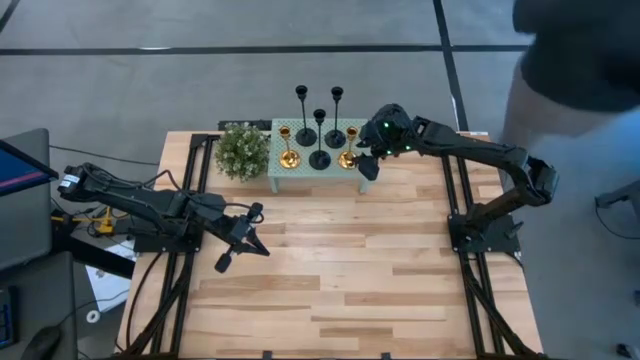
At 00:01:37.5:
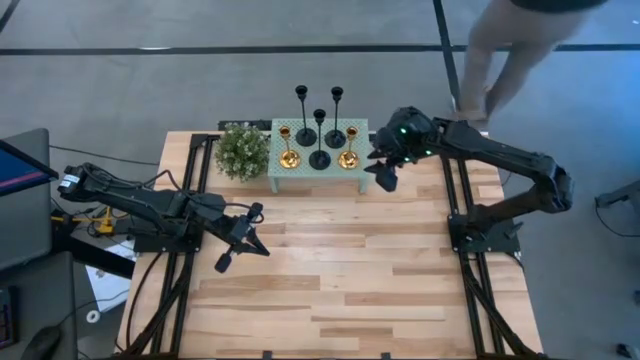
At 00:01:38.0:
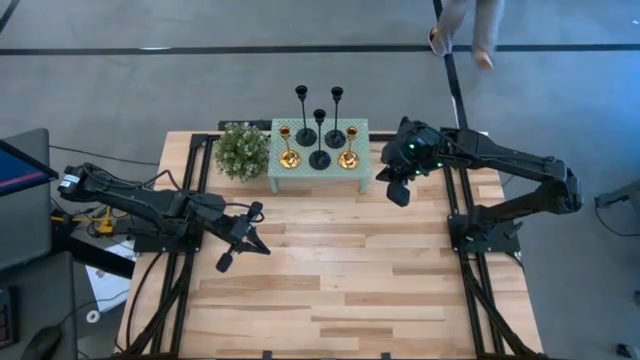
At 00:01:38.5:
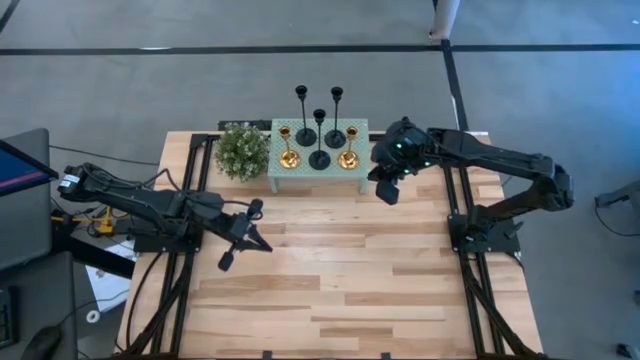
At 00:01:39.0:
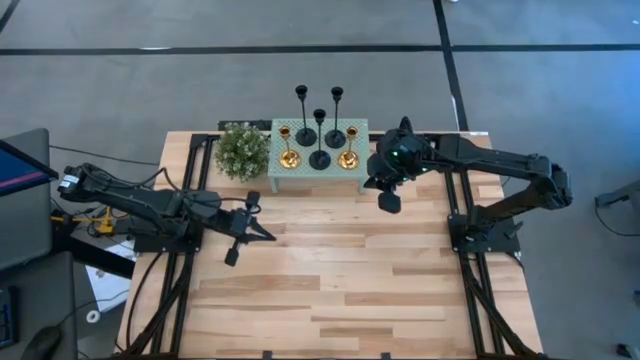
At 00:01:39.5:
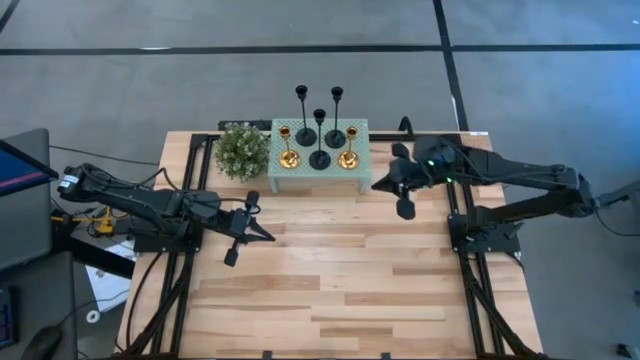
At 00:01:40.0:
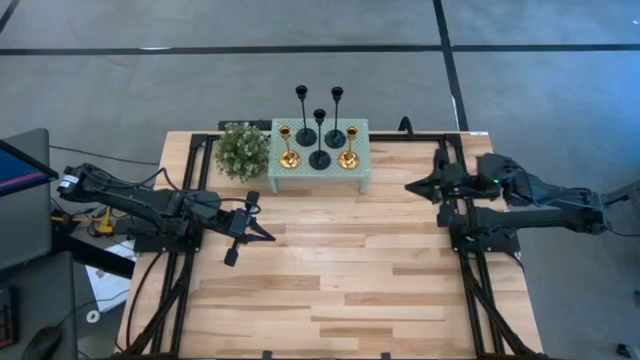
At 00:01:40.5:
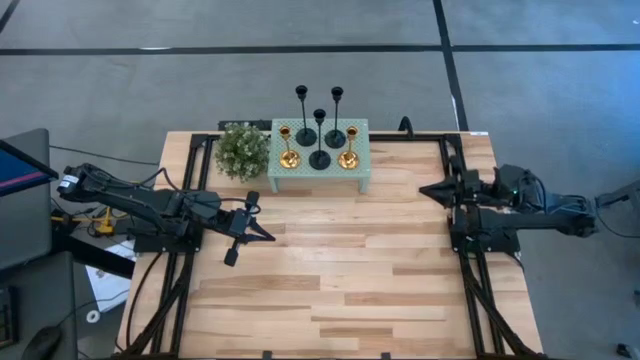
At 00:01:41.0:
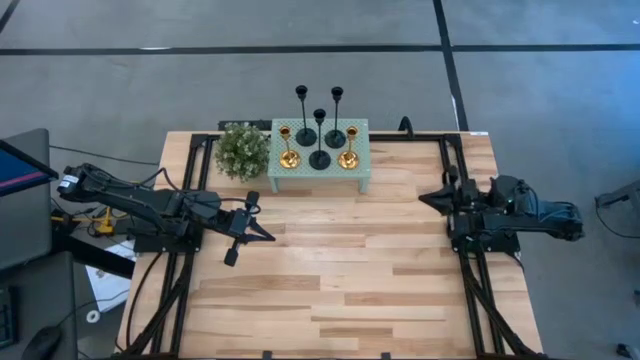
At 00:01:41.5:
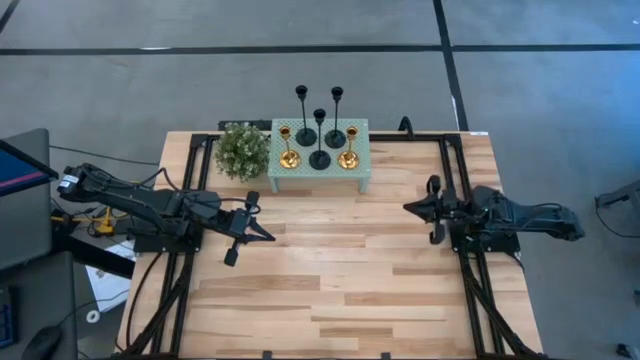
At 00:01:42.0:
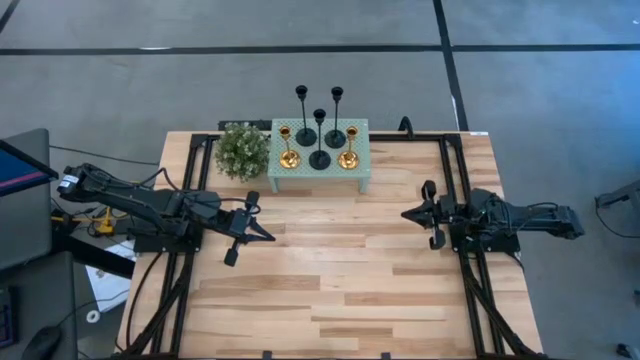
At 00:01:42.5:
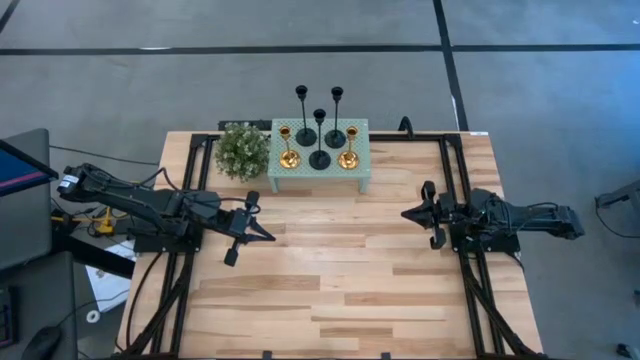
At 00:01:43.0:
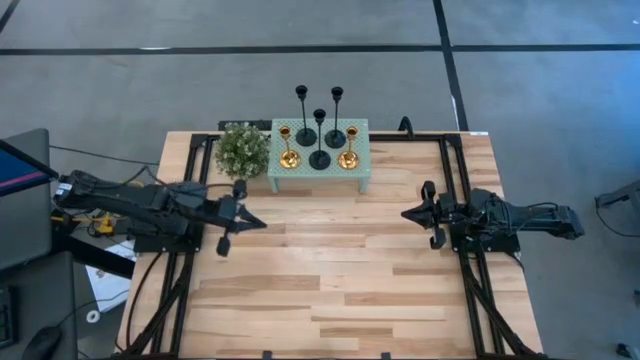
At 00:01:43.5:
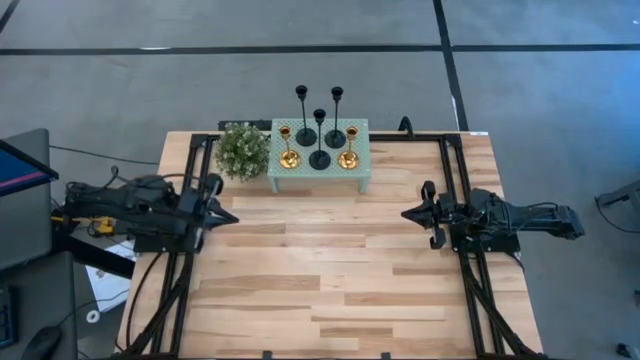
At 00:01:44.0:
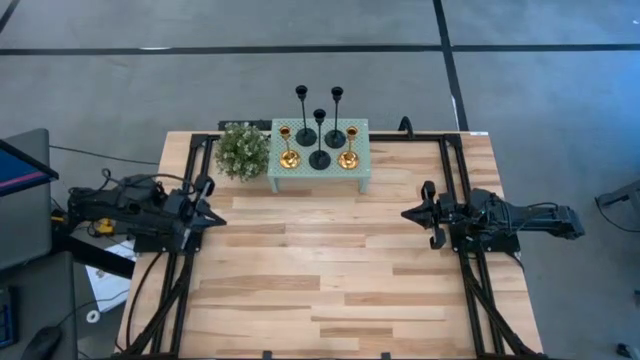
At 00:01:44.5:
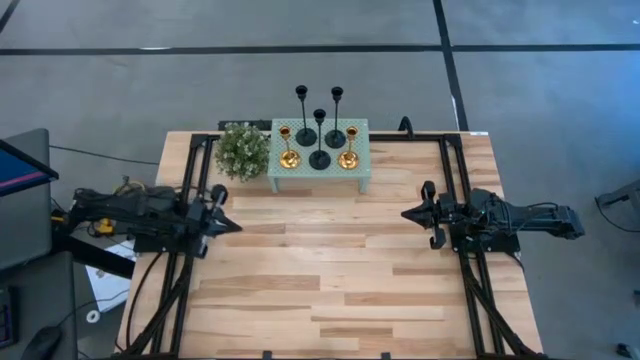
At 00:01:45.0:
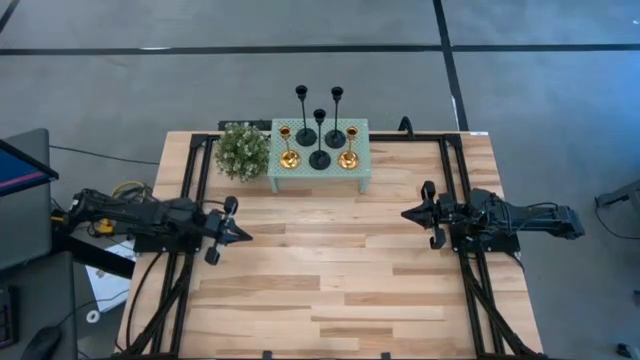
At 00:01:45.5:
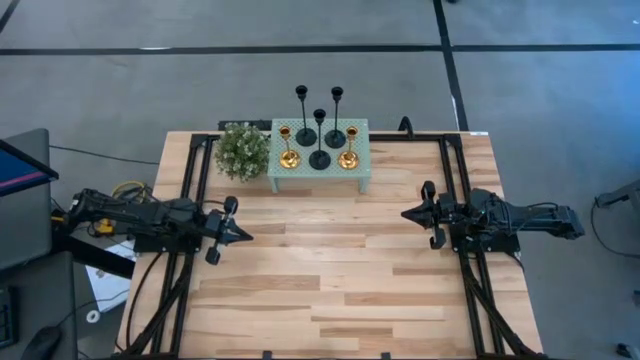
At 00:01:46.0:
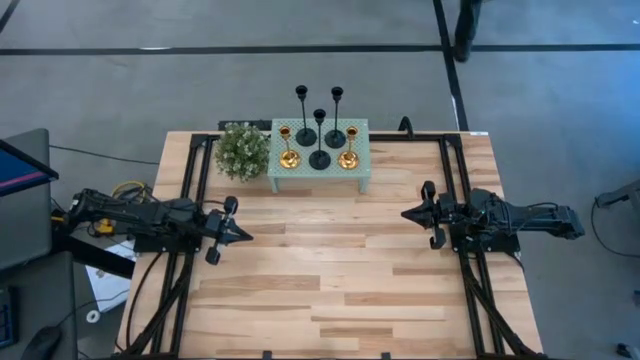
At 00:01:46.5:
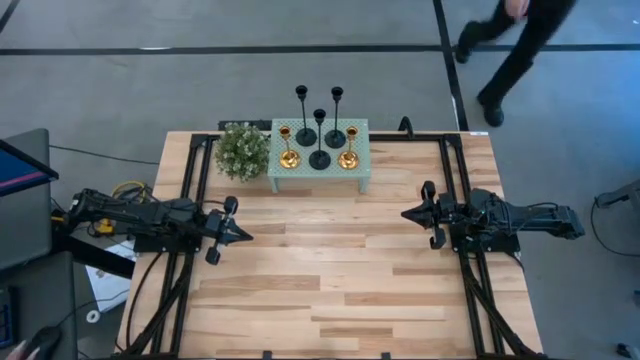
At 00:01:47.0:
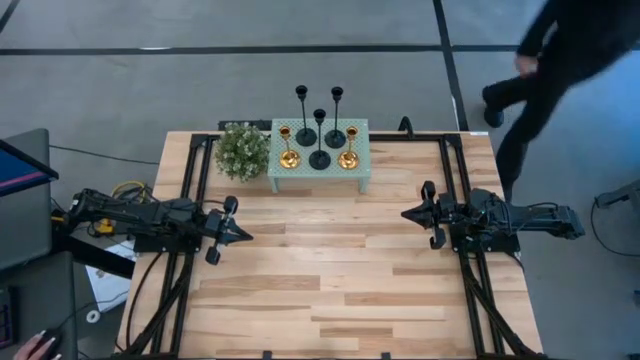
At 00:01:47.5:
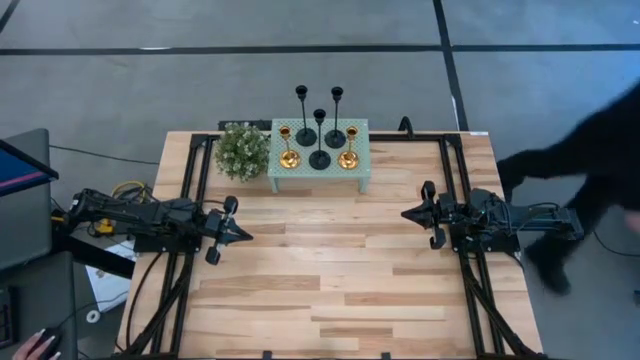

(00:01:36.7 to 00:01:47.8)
Task: Pick & Place candle stick holders
Return to Home Position

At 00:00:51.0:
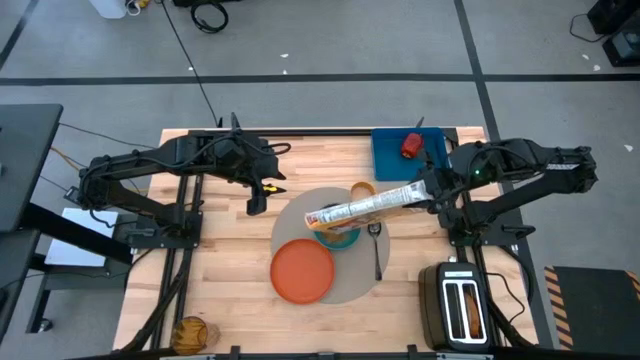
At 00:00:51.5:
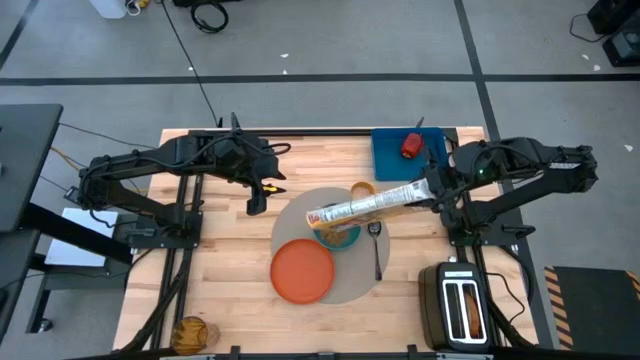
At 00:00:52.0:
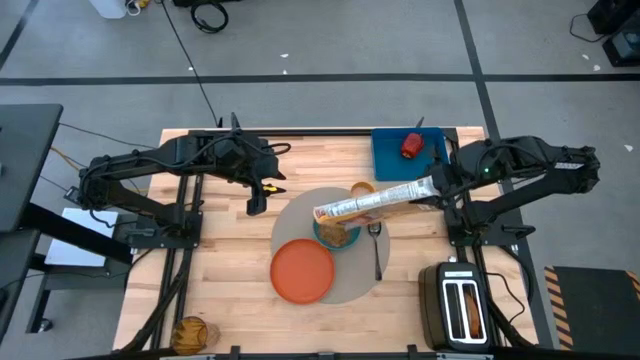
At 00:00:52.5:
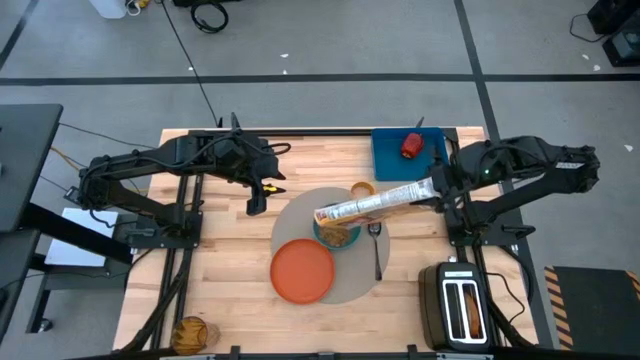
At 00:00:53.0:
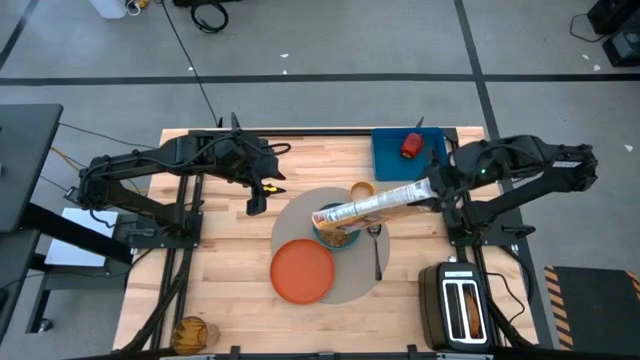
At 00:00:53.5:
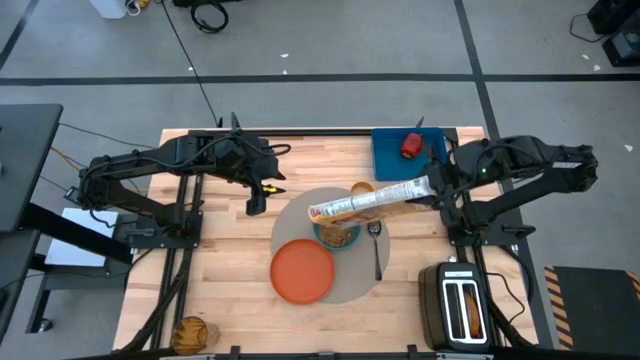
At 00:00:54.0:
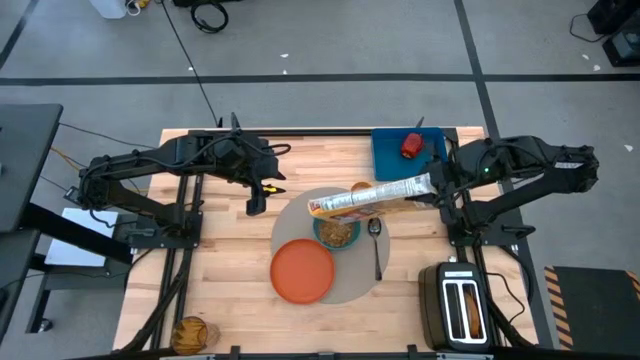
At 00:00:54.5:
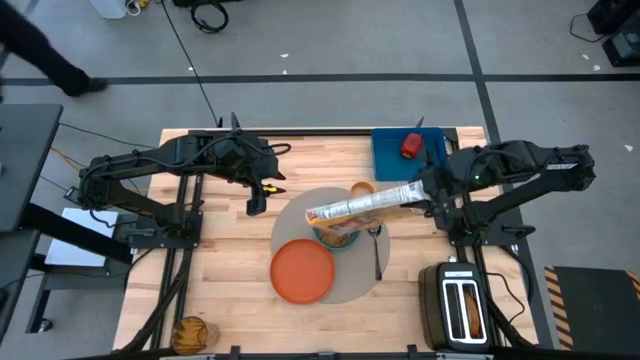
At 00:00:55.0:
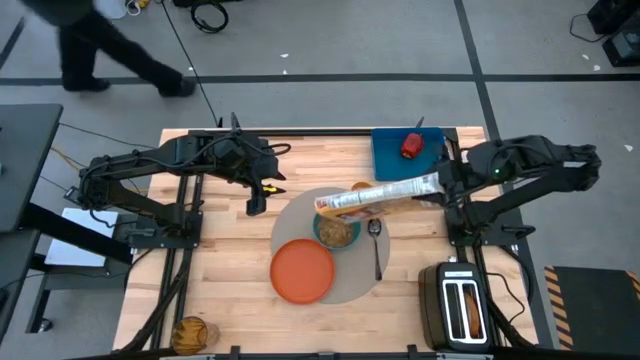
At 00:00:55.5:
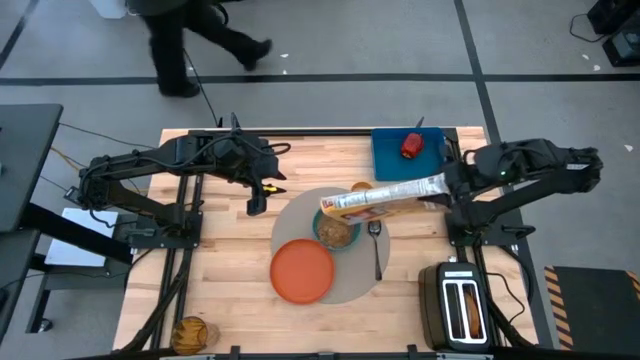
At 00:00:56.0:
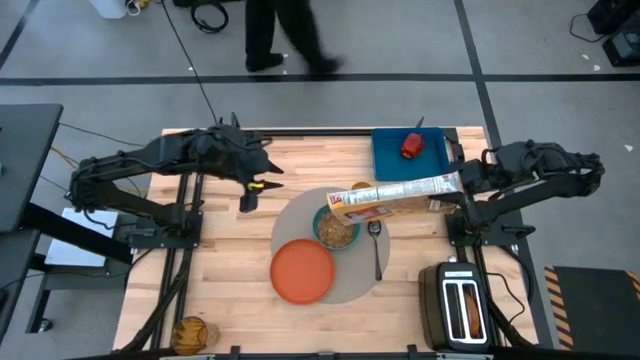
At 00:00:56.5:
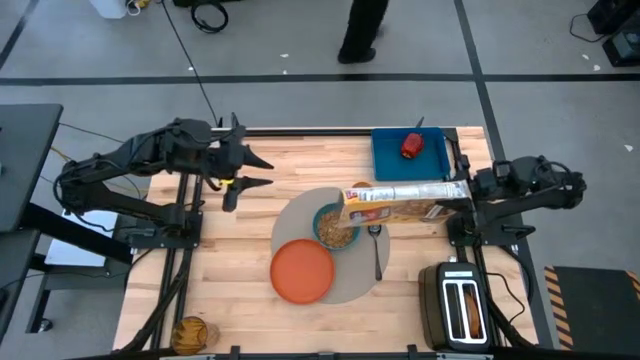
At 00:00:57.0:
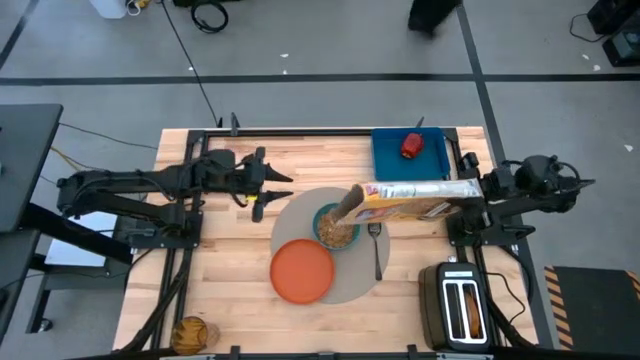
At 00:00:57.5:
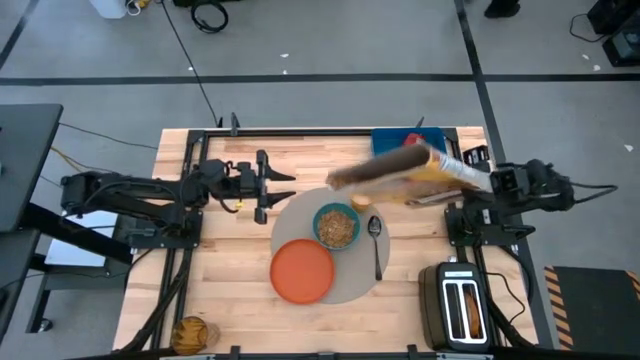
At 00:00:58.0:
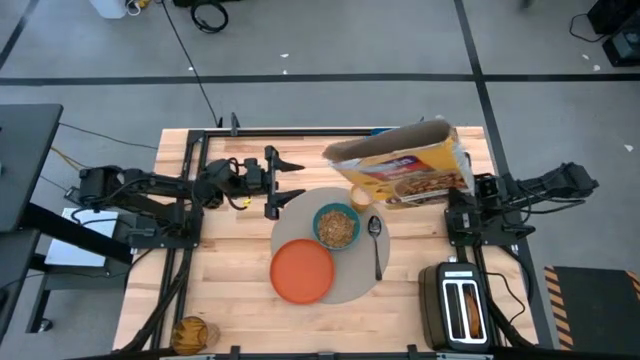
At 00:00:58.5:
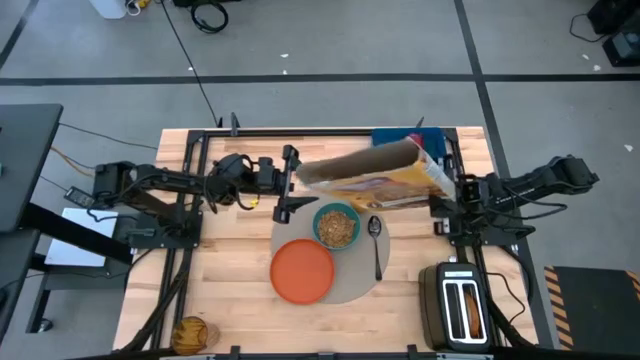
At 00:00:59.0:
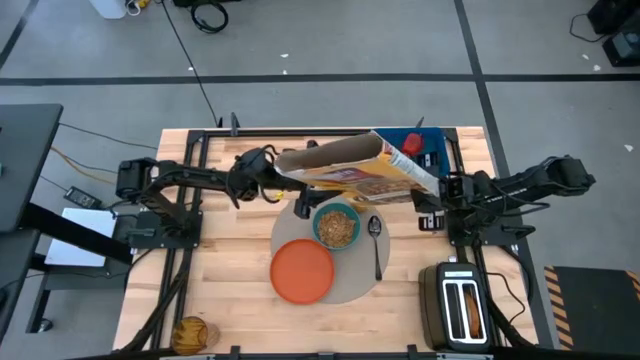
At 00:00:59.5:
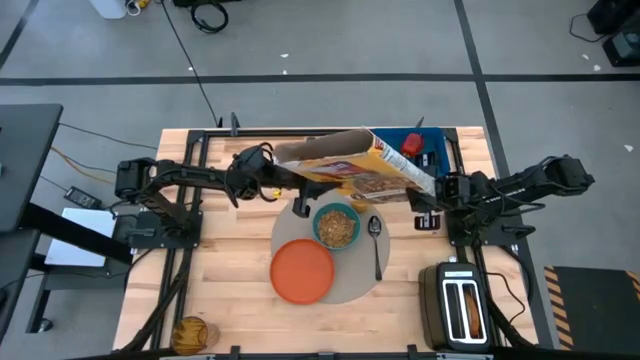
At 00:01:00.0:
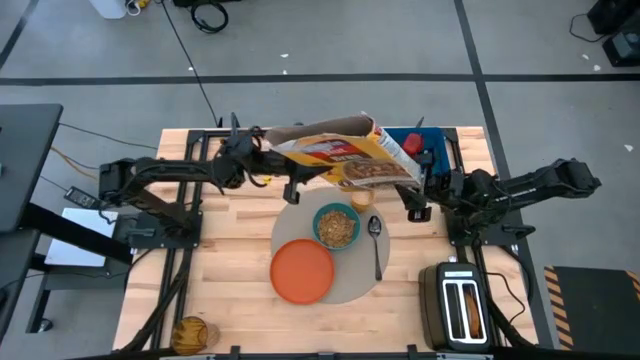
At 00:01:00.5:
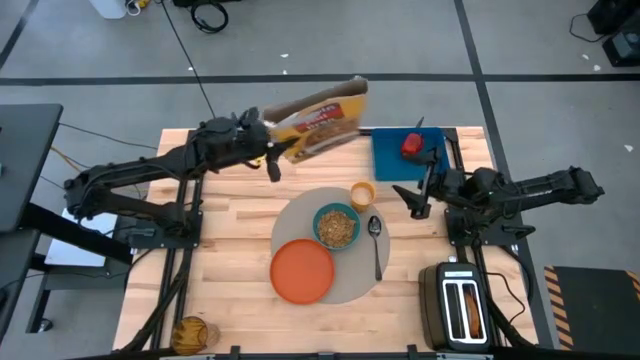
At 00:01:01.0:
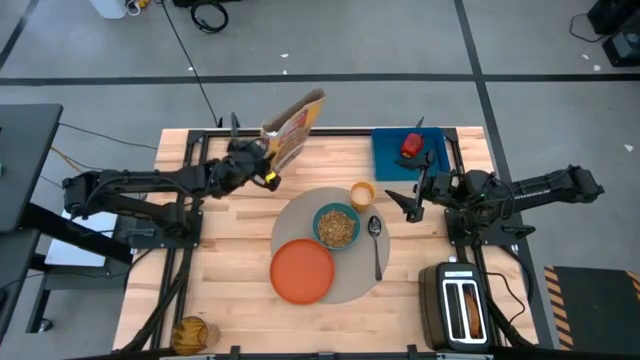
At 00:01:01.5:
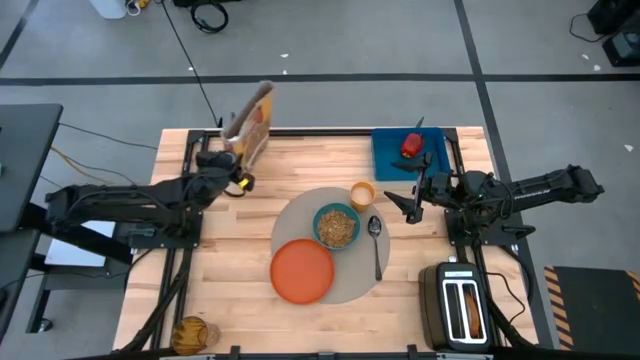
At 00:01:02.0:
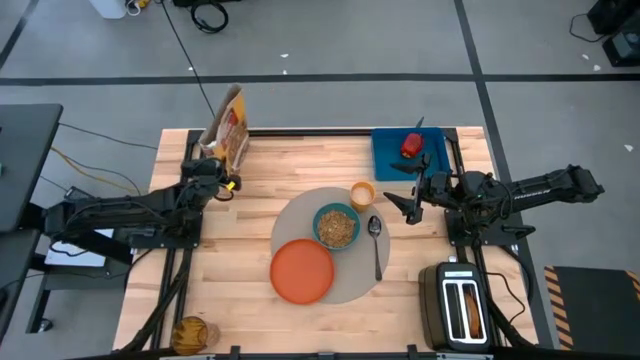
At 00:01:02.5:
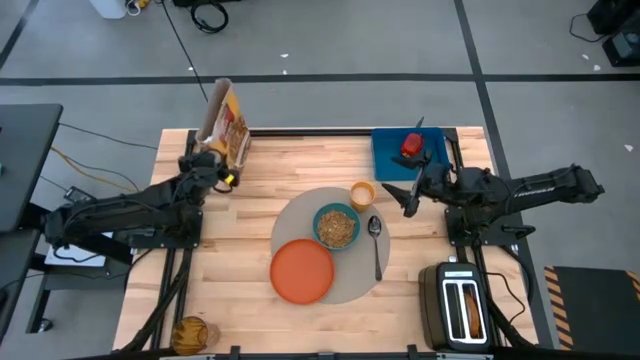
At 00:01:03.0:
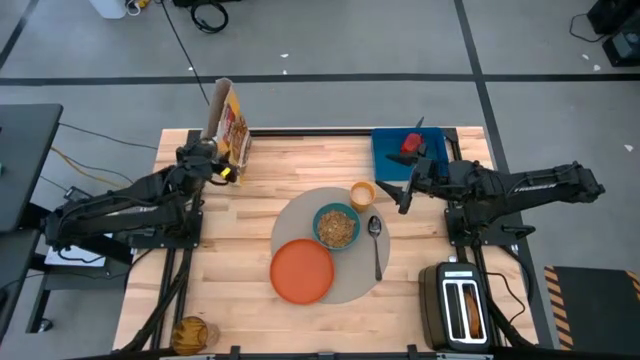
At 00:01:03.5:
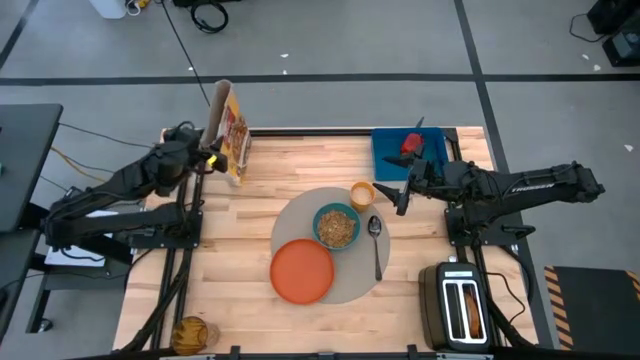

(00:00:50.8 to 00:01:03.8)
Task: Arrange a breakfast setting
Pour the cereal from the cereal box into a bowl
